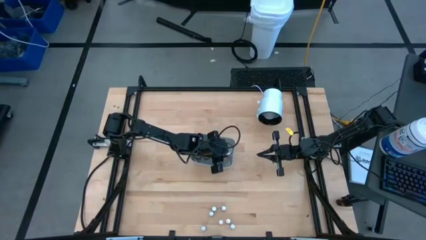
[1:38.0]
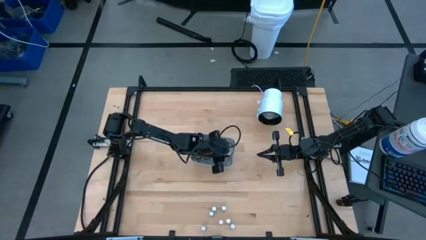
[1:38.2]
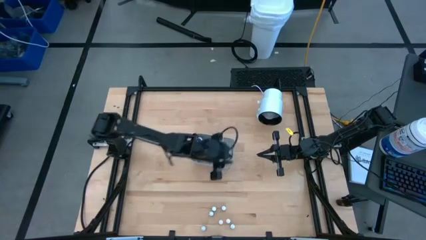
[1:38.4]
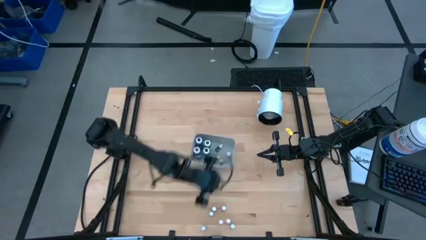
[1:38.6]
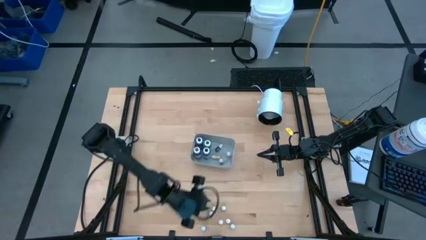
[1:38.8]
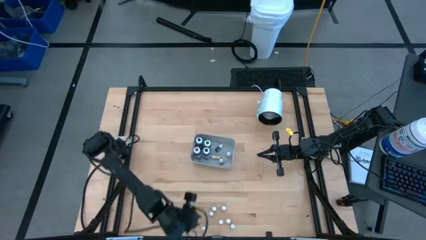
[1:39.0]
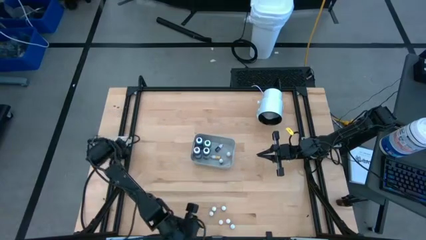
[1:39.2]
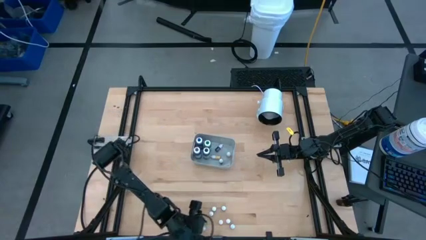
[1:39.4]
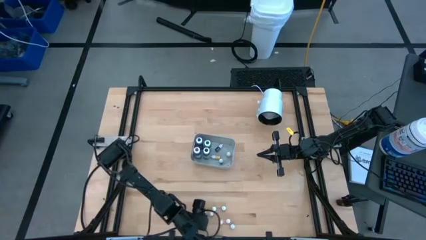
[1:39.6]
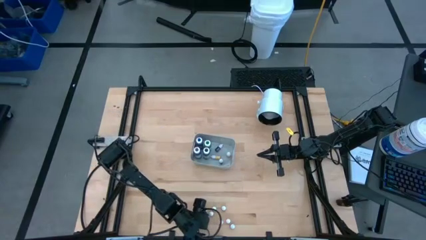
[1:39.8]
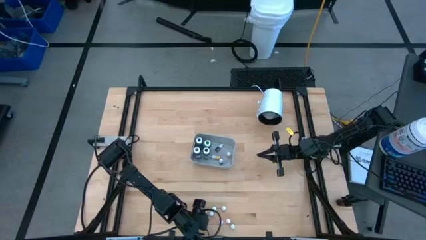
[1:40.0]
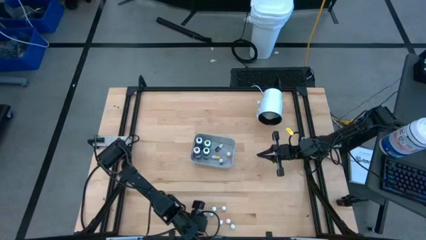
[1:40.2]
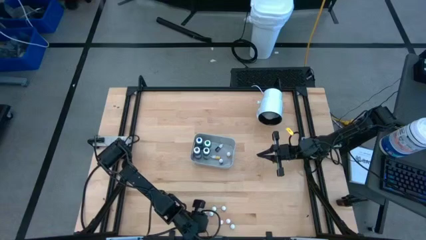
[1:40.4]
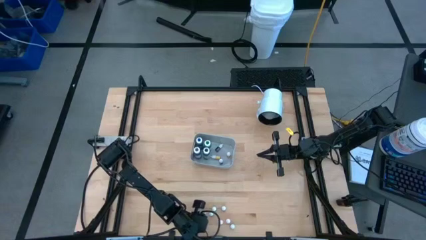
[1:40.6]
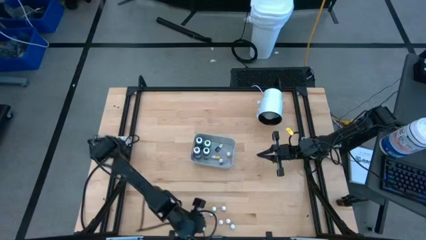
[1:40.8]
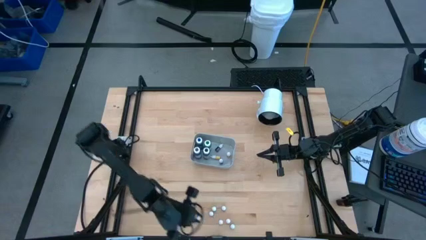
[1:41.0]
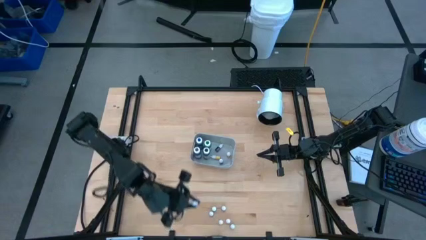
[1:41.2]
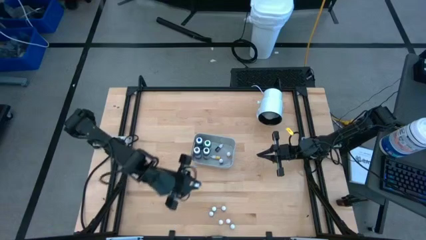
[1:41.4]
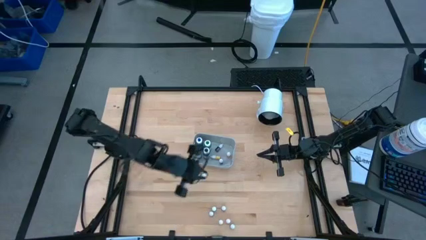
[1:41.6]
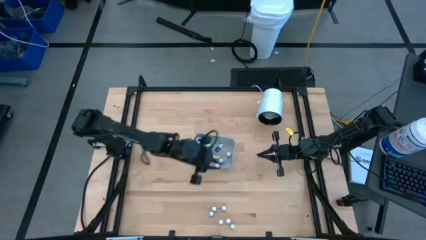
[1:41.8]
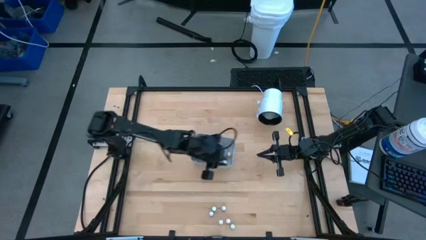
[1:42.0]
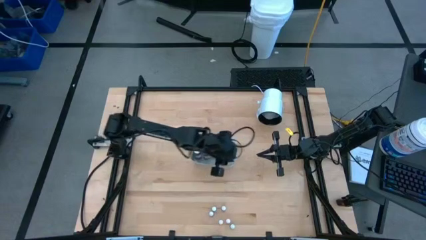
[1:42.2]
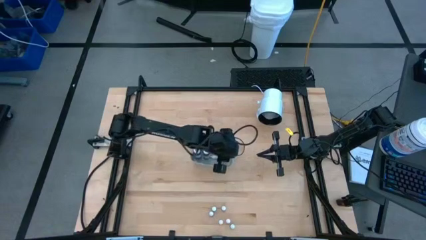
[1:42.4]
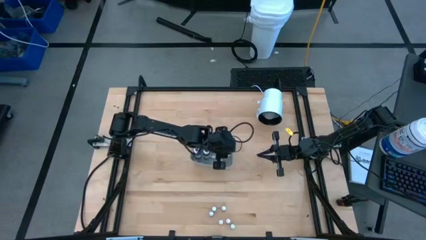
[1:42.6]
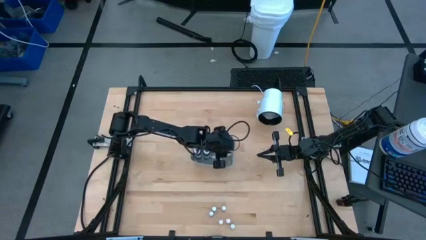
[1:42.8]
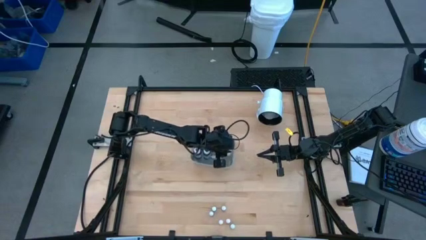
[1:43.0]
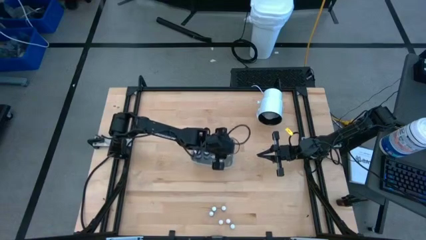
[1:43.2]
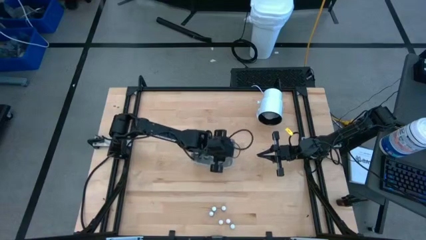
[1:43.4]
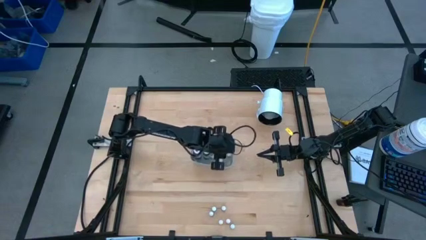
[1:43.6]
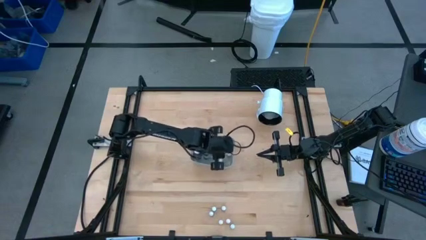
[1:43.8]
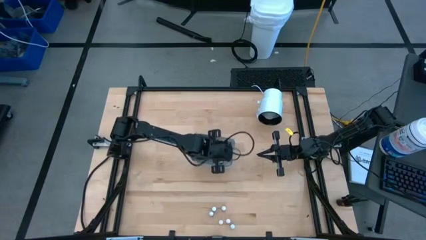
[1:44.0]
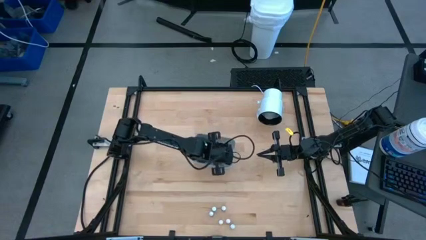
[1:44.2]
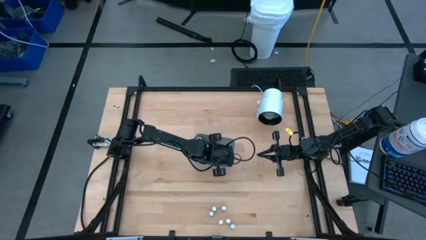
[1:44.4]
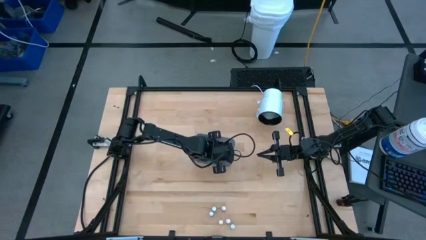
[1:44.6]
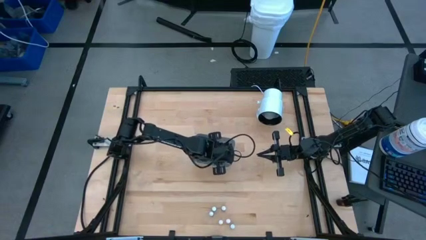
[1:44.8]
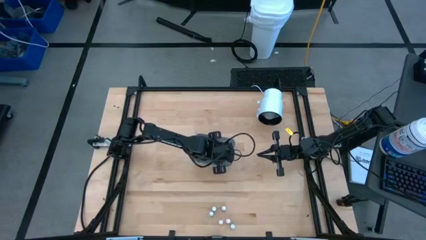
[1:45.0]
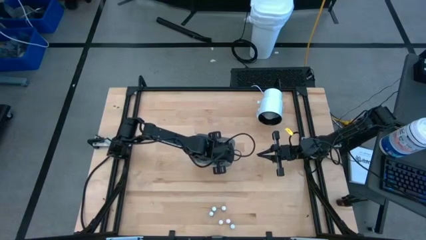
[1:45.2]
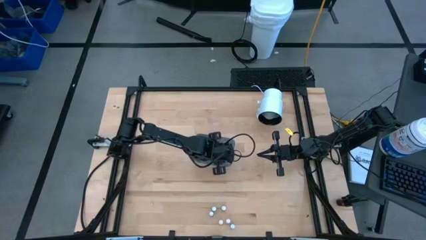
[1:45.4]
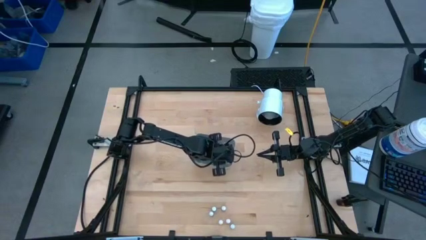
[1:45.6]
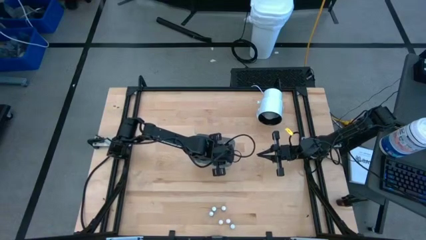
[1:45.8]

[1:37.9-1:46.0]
Task: Pick & Place food coloring
Put the green food coloring bottle into the gray bin

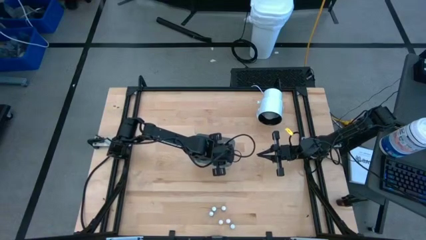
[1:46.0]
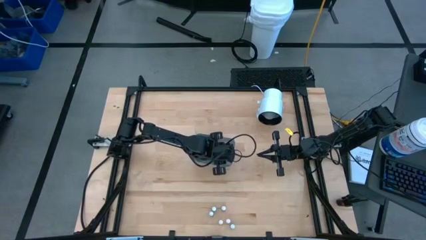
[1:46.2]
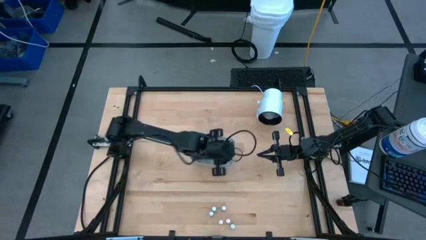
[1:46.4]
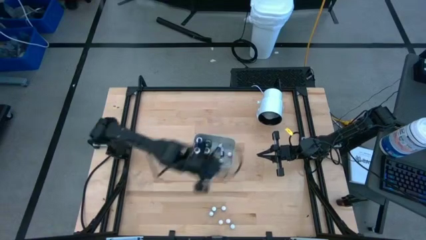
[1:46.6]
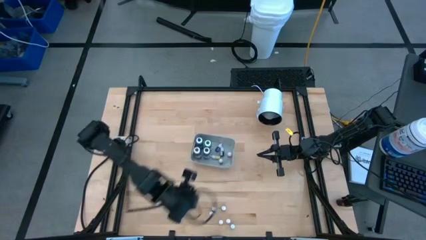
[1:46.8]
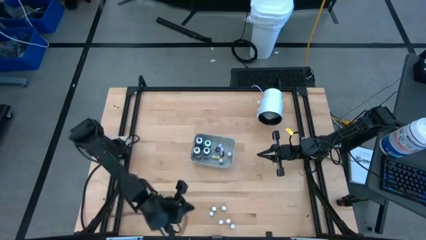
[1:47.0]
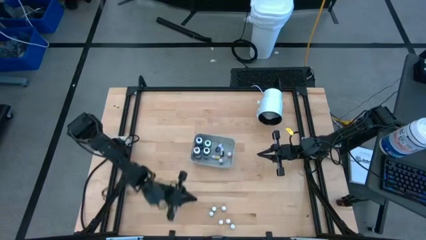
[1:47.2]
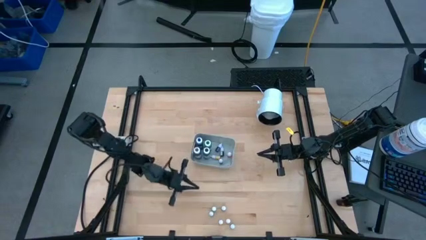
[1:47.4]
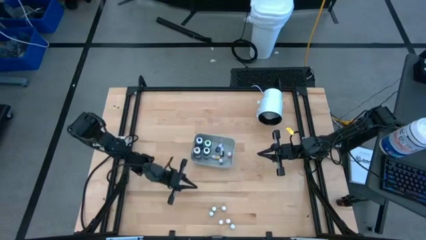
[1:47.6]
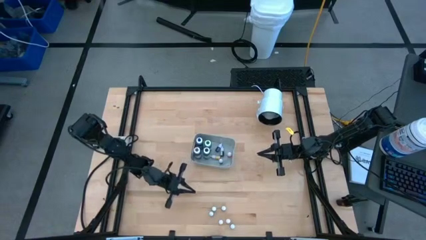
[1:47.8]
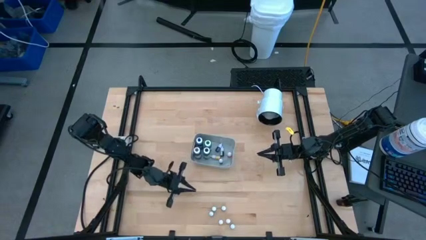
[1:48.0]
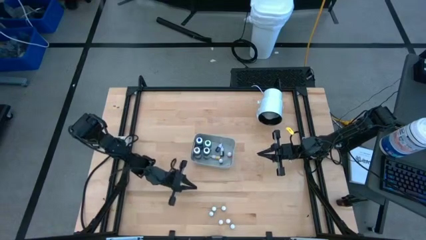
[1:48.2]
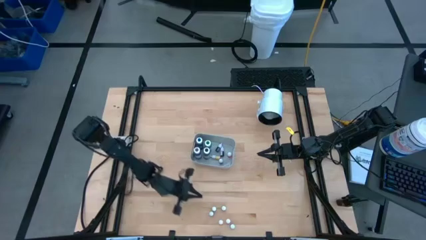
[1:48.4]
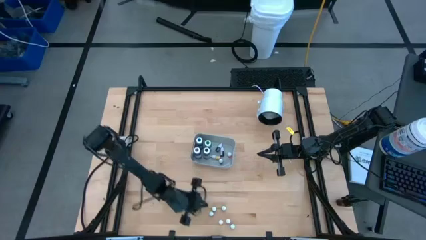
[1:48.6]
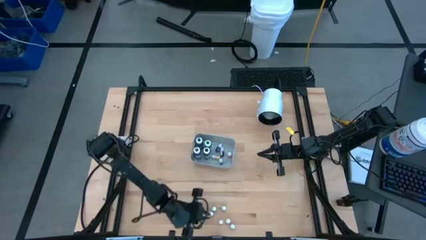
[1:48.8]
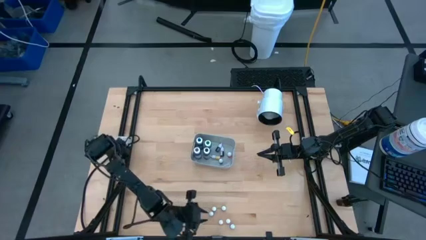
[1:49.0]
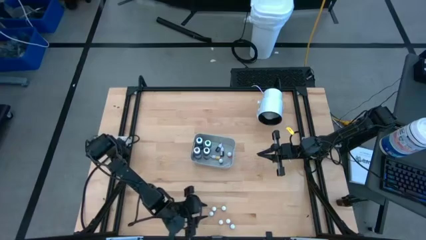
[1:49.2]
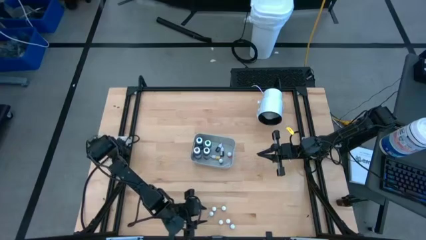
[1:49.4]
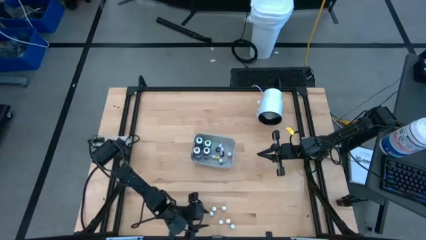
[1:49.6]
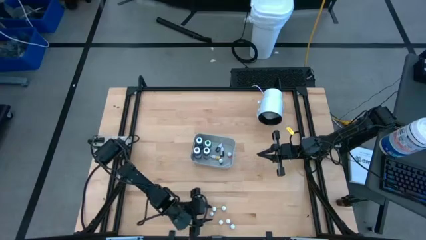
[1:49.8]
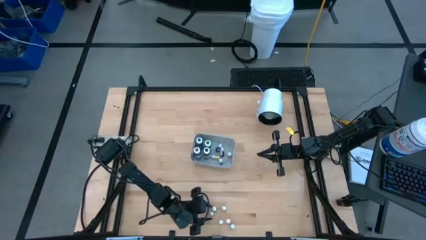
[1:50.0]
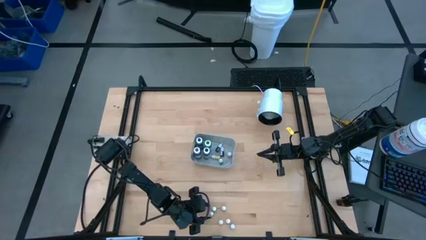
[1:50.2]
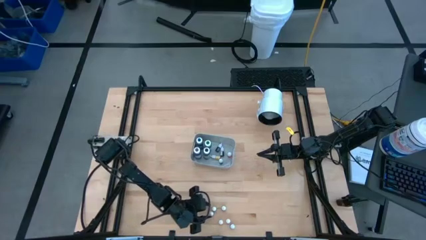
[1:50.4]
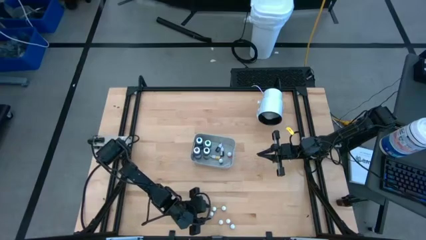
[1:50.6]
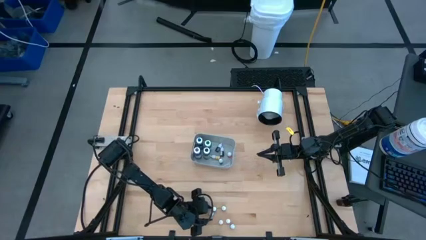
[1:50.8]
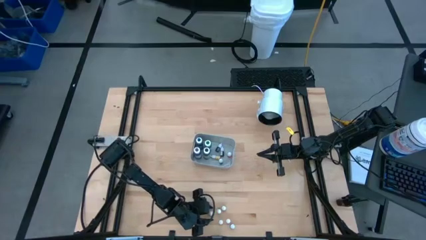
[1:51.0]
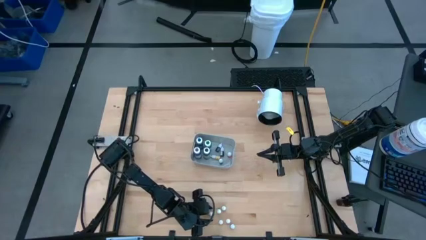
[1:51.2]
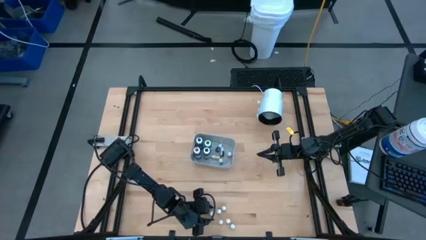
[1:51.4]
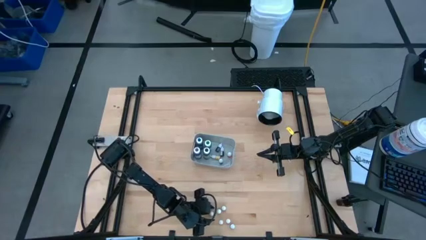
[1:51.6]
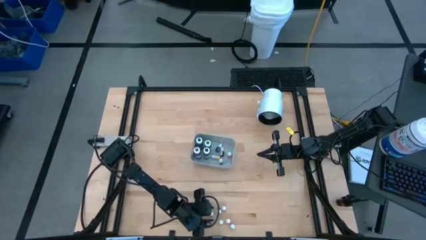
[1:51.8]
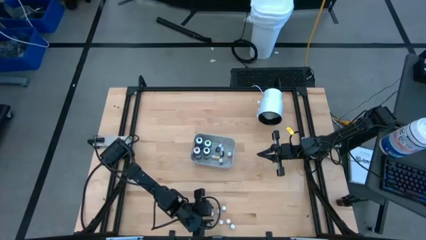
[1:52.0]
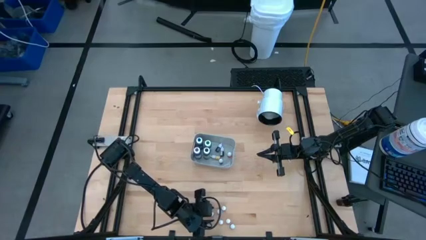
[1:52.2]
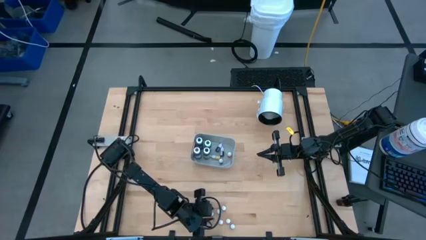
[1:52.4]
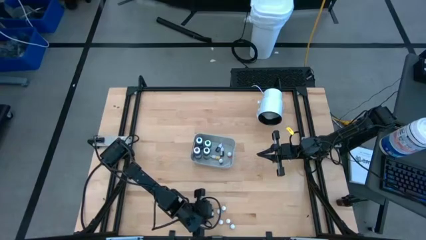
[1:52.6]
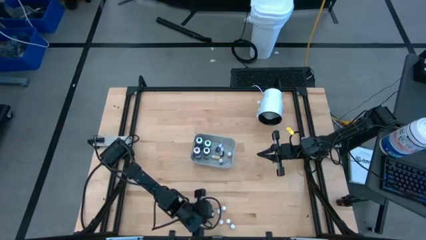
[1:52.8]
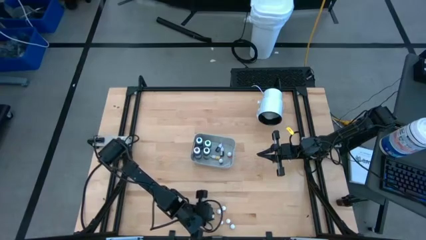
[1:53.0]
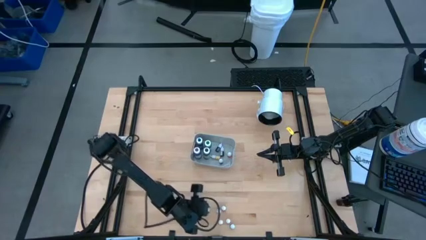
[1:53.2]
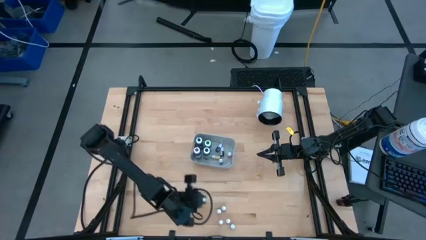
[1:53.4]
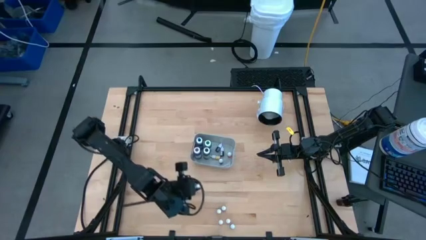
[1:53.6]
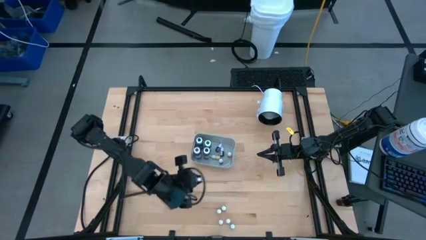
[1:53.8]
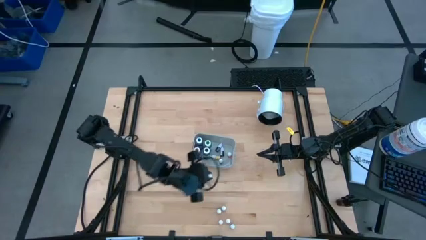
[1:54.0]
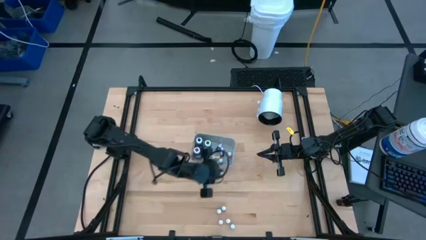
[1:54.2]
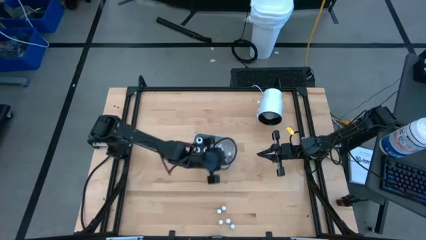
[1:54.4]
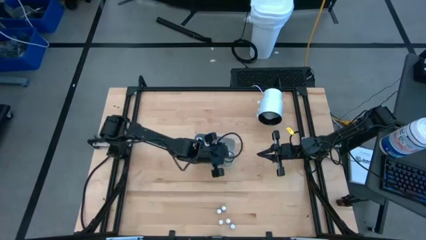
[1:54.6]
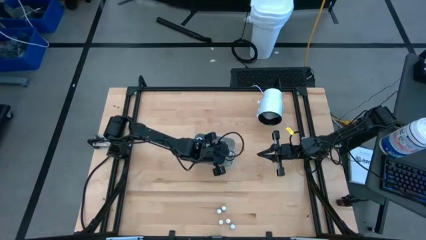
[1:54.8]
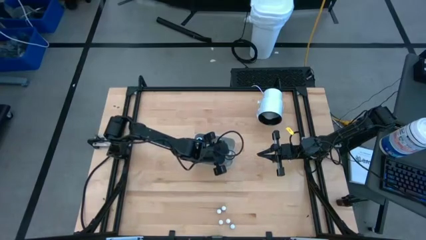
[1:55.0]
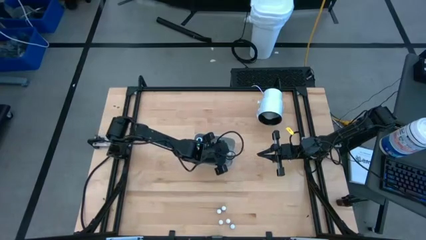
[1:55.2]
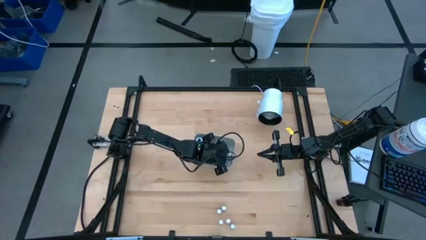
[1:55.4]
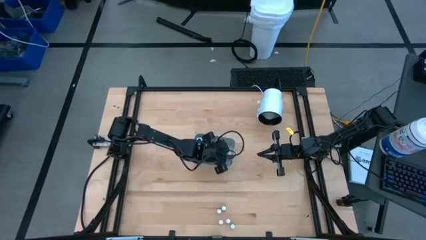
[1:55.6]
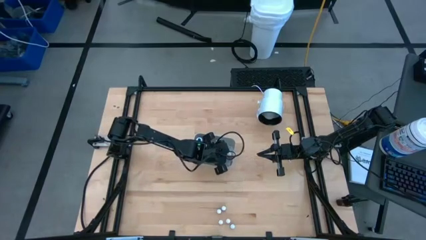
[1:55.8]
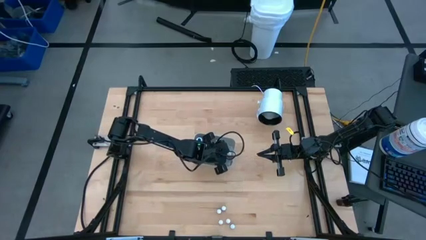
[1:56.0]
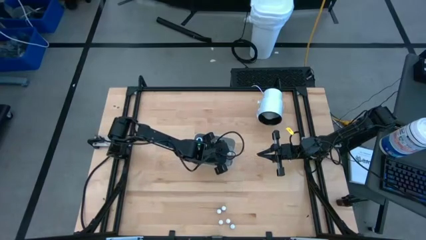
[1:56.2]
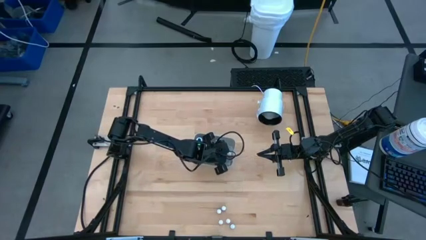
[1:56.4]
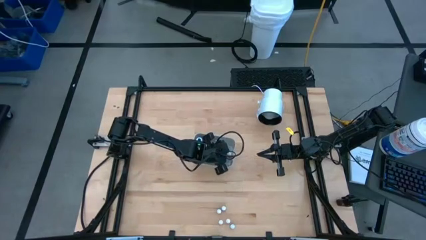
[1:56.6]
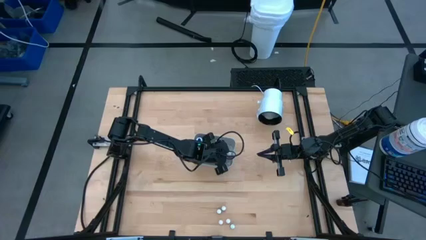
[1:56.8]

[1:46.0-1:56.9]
Put the blue food coloring bottle into the gray bin
